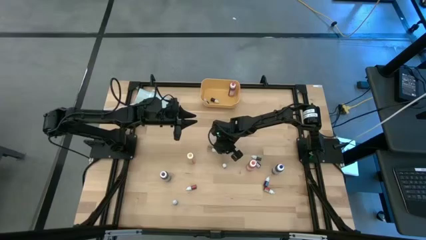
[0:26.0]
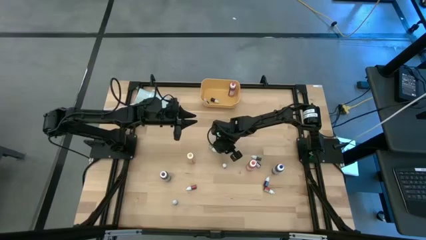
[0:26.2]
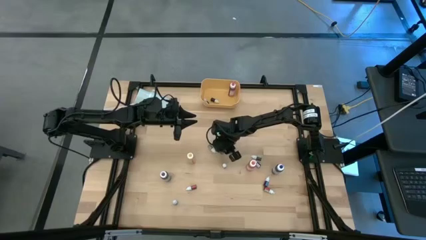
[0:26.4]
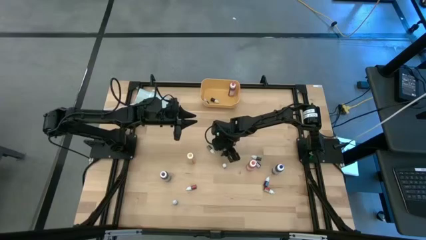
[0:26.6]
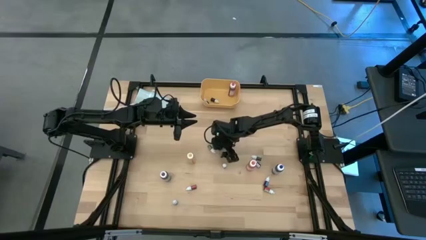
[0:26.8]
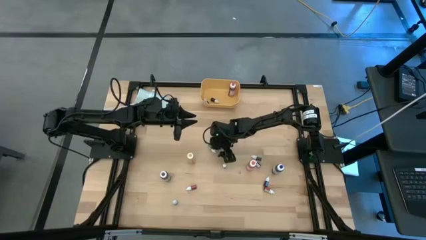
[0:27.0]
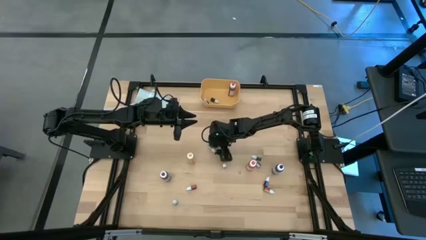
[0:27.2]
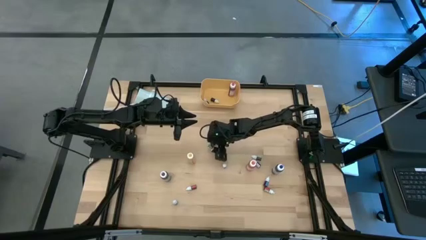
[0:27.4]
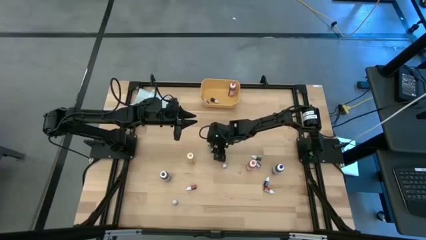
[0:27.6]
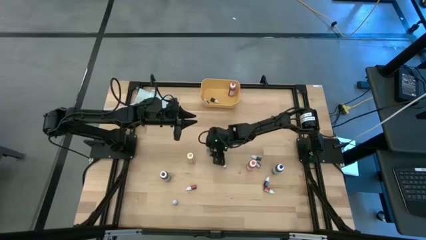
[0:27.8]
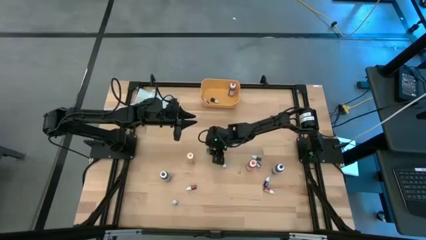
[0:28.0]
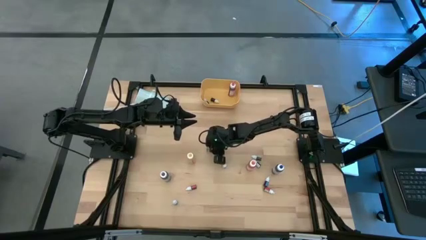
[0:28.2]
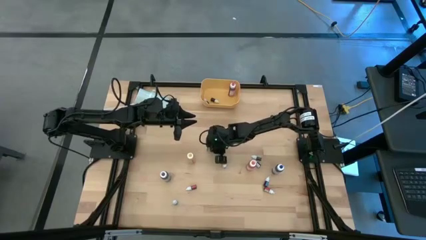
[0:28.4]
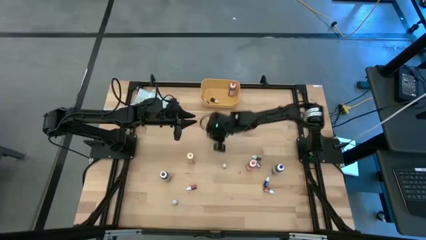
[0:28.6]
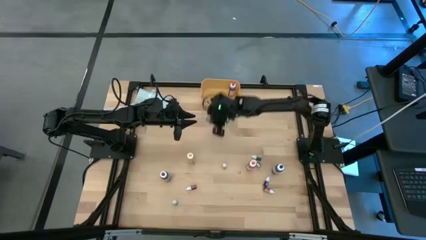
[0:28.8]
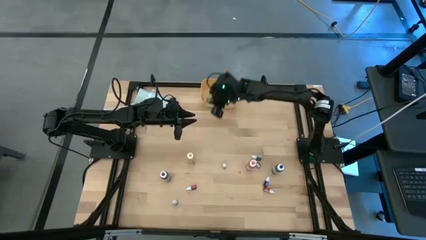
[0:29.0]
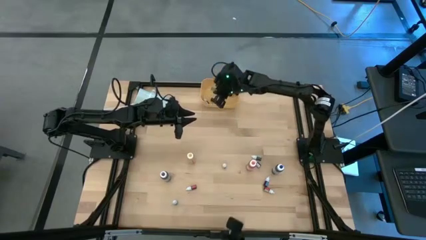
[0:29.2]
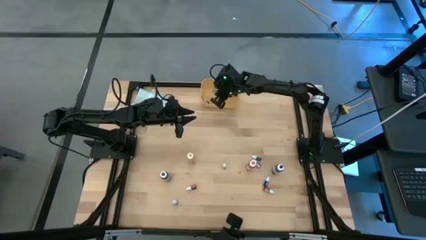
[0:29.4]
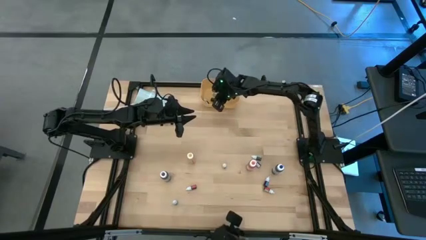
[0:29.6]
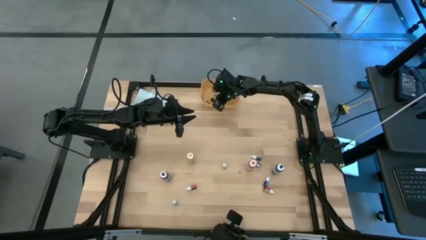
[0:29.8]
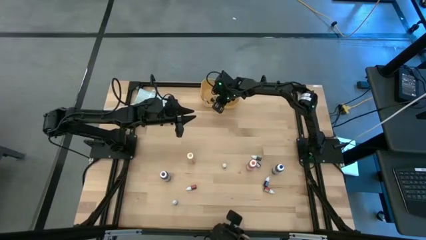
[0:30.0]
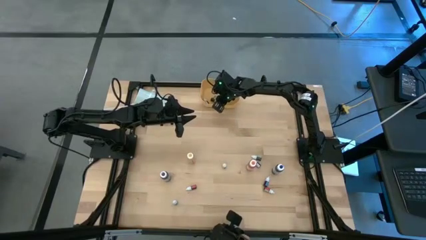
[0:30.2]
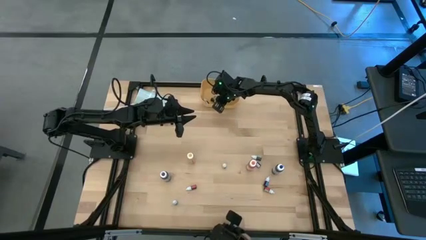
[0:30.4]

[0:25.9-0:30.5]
Task: Pick & Place food coloring
Put the green food coloring bottle into the yellow bin

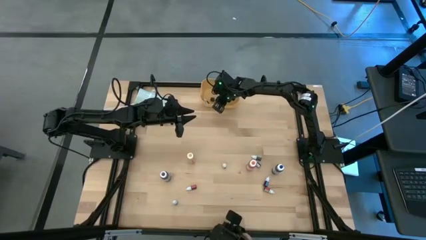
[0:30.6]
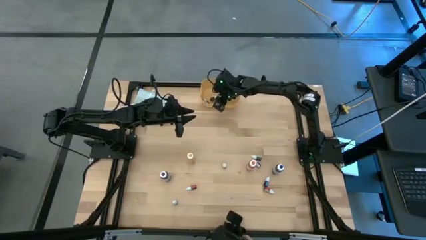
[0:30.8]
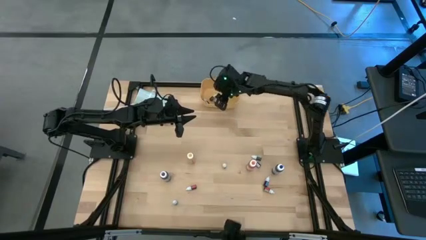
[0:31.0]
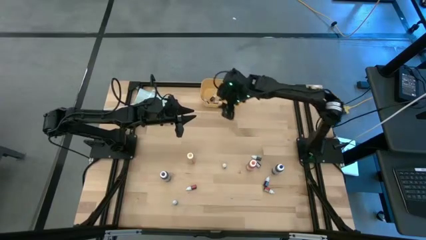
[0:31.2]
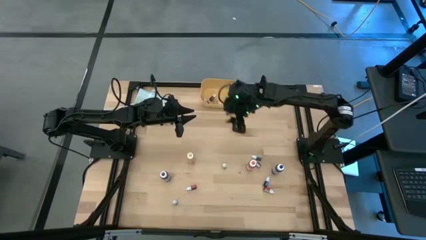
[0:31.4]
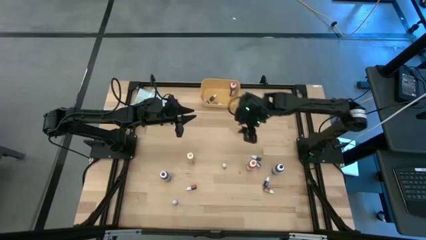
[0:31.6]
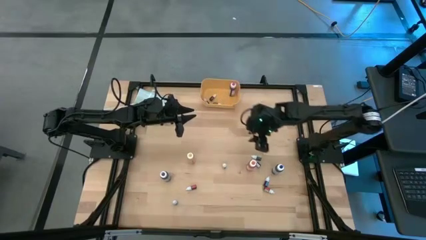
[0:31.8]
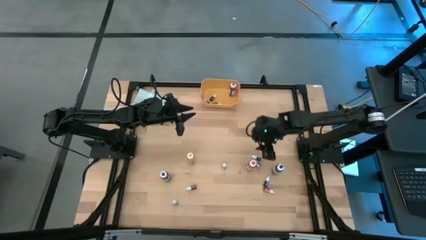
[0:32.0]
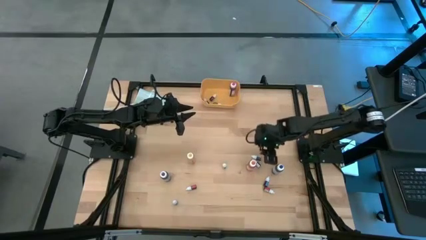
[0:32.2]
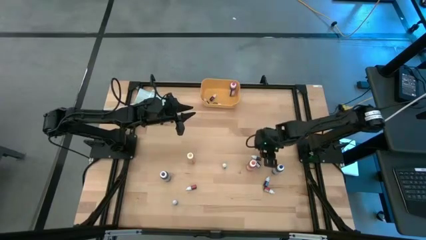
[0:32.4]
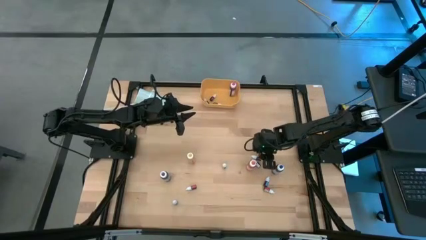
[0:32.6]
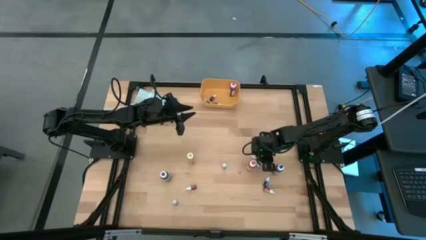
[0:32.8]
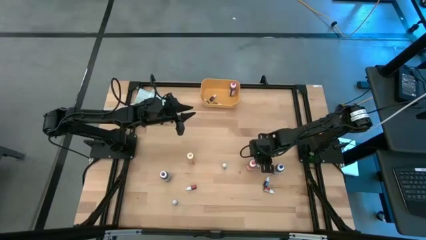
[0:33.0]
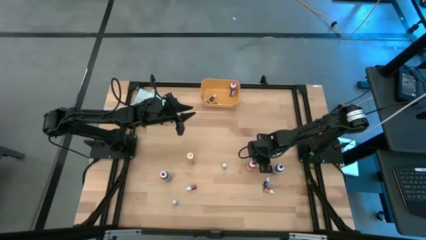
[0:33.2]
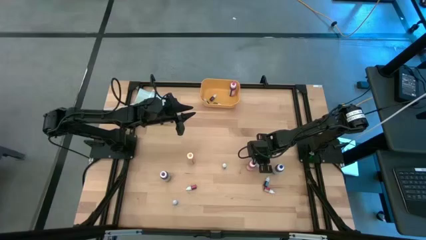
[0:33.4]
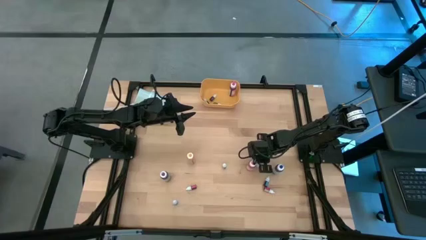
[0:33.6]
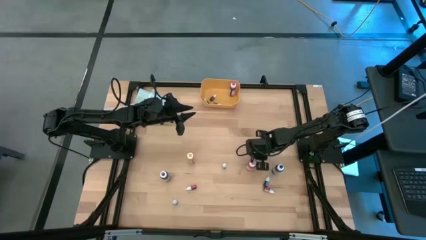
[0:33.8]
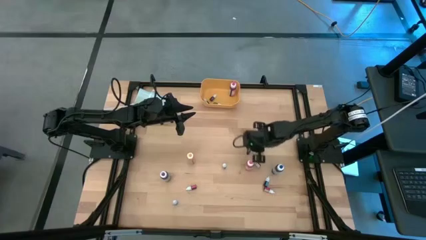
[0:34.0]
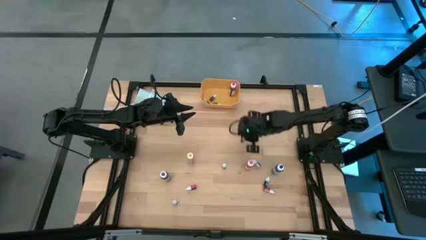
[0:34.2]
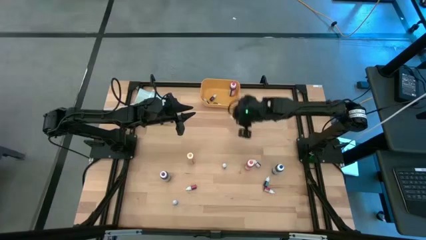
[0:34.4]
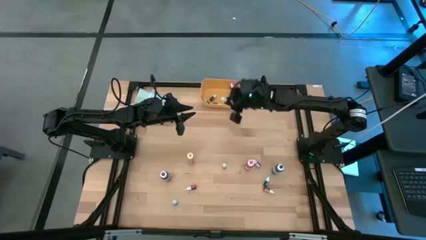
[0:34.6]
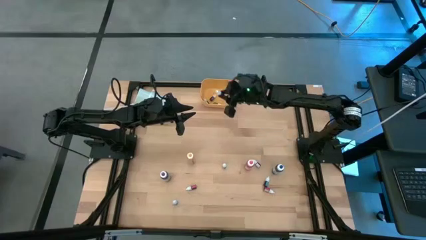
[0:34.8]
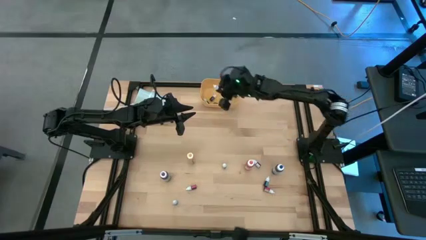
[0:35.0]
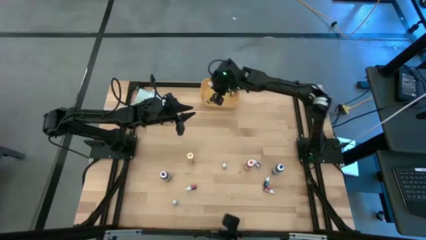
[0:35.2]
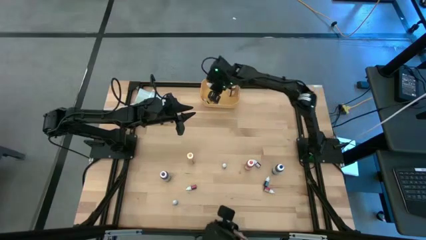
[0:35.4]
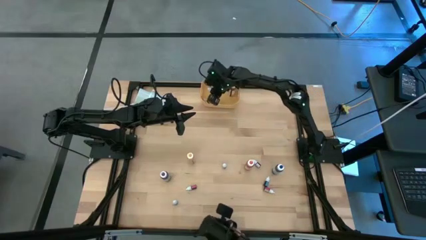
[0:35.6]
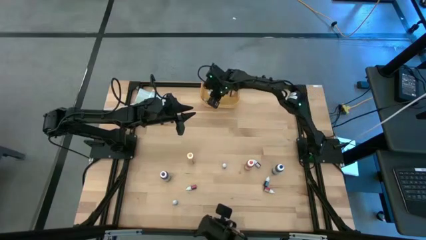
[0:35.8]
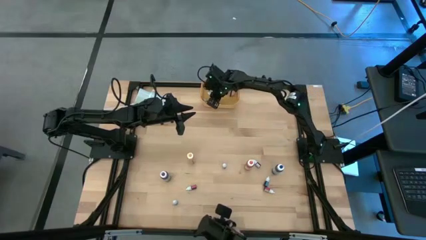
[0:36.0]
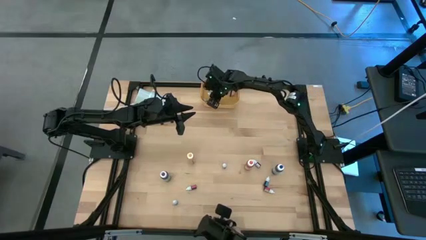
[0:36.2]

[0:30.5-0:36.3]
Put the black food coloring bottle into the yellow bin

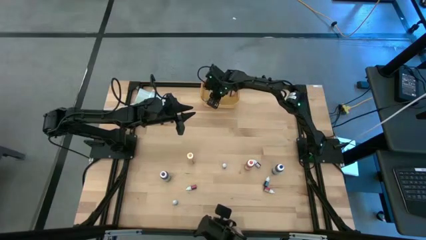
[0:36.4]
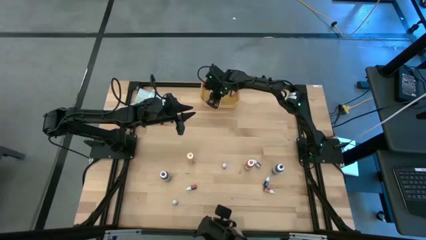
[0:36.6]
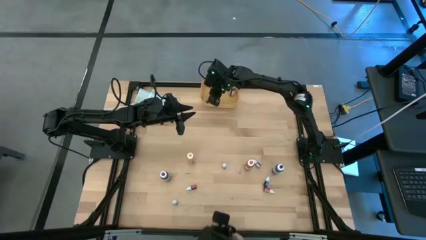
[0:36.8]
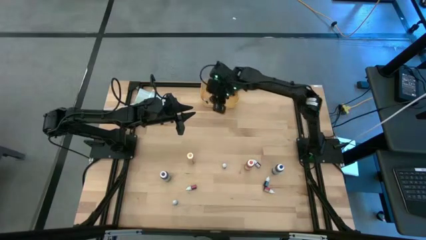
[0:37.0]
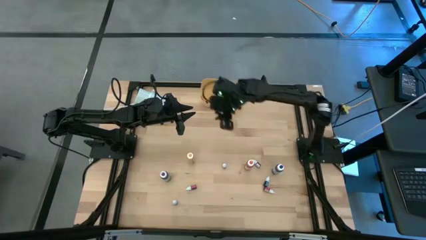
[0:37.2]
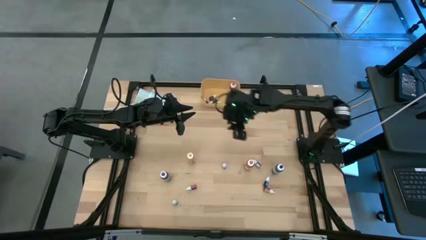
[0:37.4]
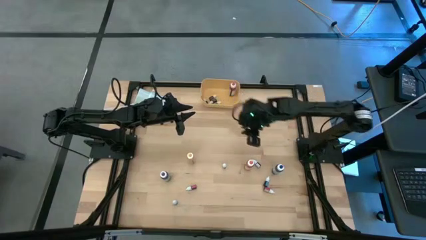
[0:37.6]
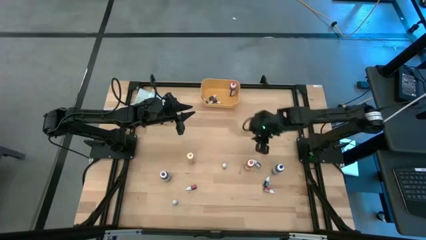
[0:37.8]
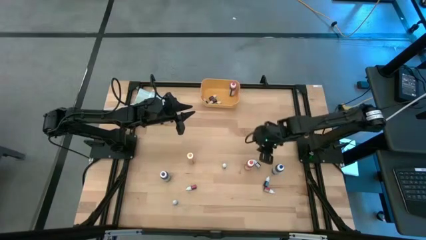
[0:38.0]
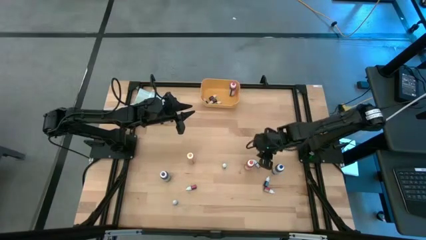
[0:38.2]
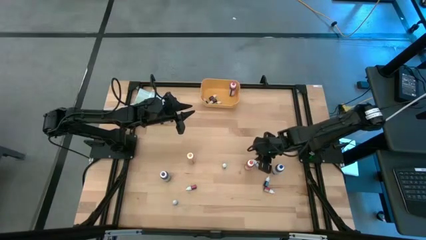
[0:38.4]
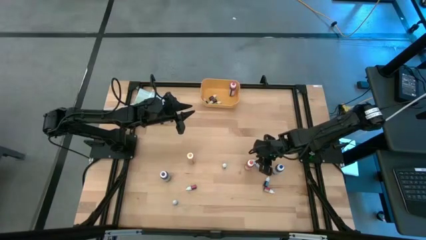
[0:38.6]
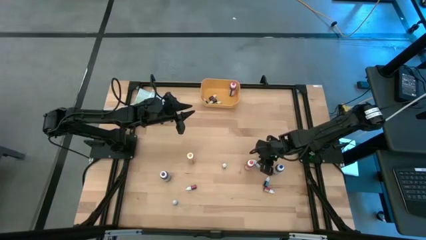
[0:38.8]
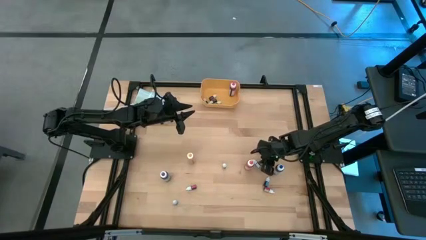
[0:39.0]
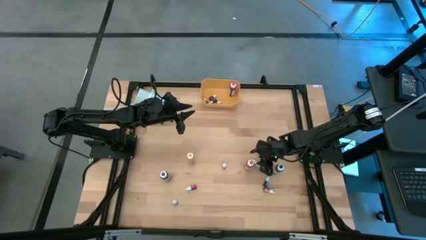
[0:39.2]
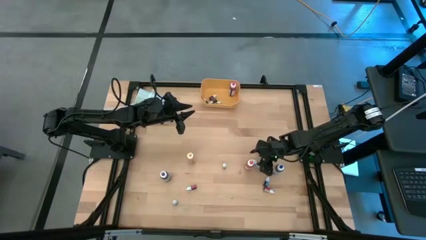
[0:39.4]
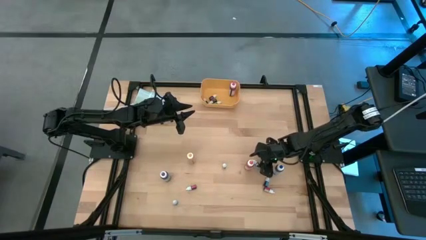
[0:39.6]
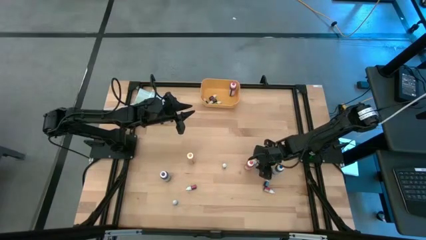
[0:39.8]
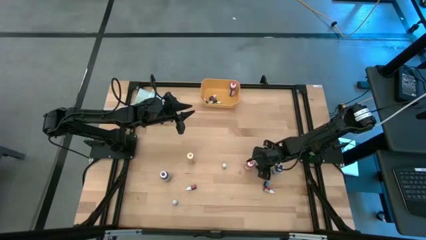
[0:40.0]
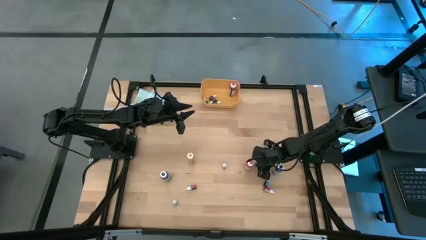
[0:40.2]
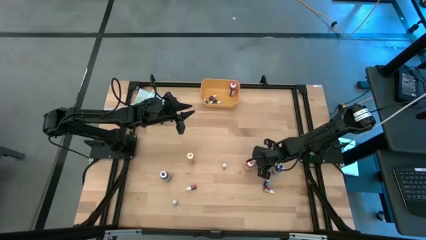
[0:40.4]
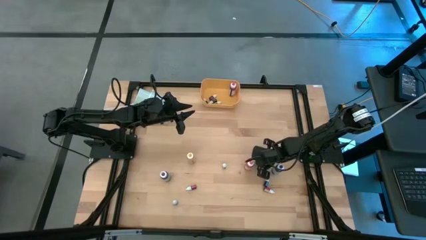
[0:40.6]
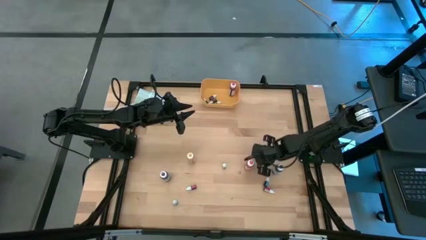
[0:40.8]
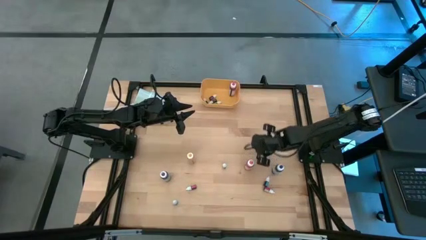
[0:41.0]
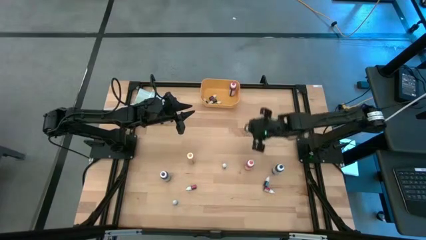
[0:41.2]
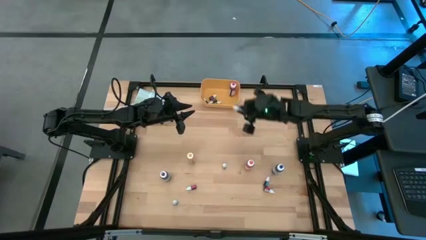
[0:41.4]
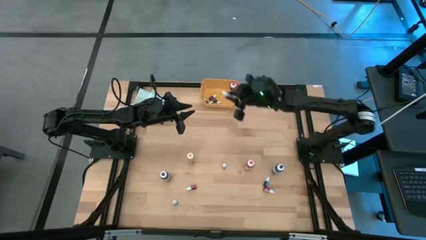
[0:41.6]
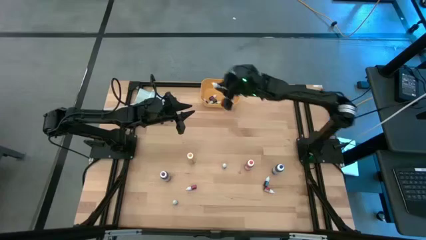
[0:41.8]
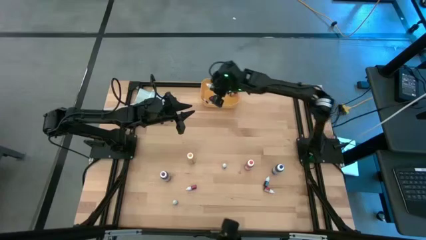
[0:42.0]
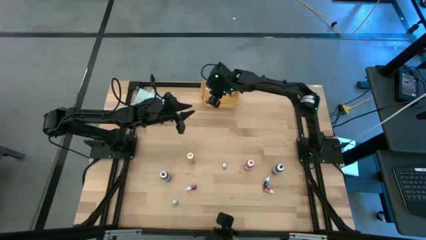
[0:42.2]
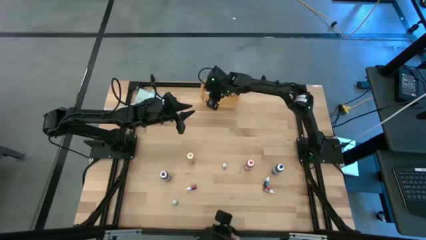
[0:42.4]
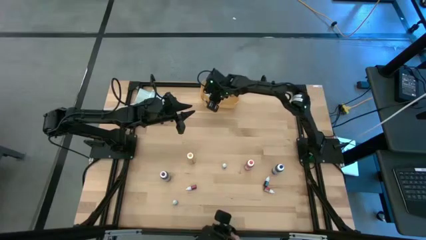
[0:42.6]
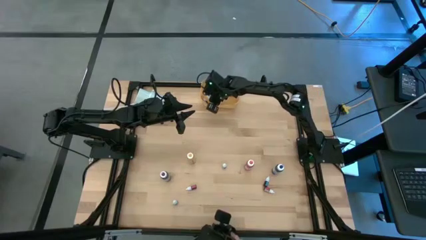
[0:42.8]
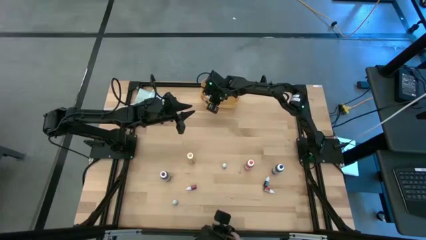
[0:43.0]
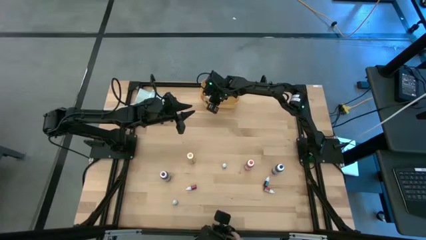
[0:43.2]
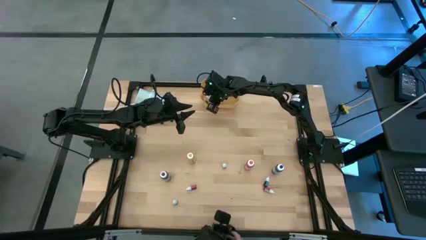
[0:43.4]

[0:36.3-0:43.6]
Put the pink food coloring bottle into the yellow bin
